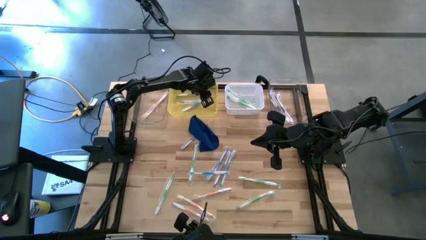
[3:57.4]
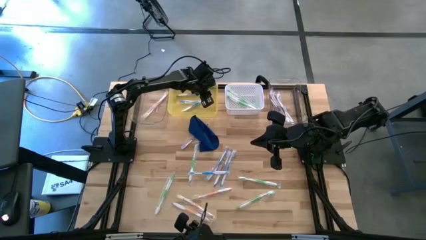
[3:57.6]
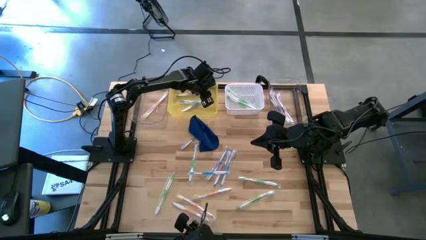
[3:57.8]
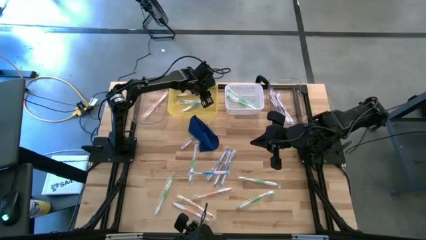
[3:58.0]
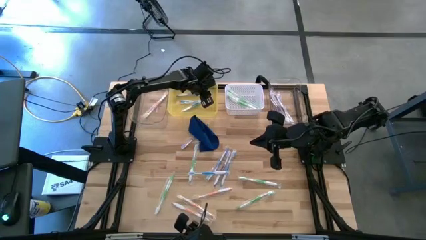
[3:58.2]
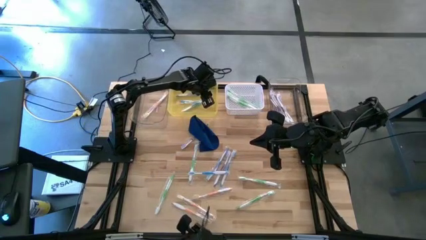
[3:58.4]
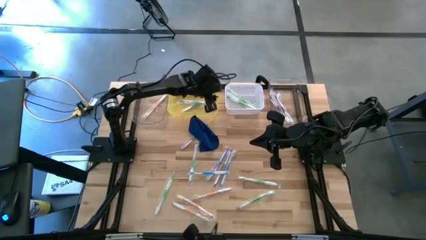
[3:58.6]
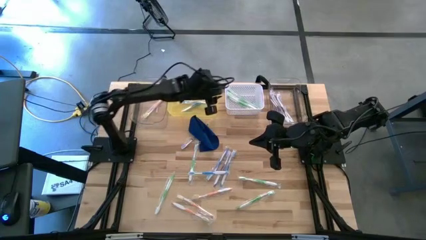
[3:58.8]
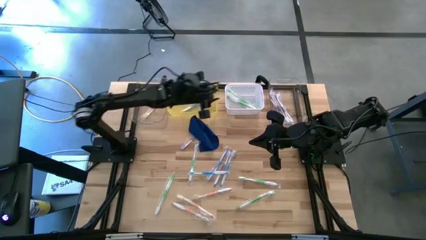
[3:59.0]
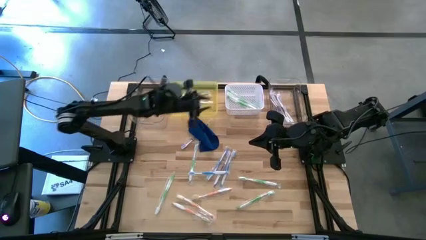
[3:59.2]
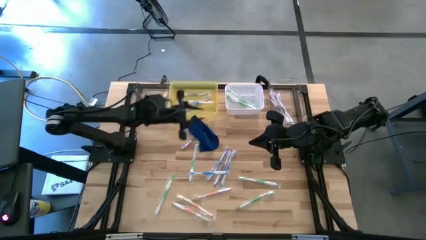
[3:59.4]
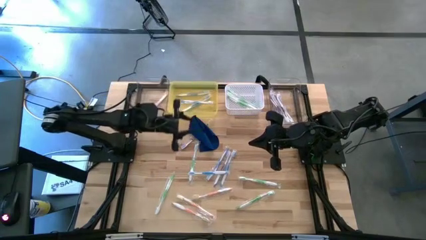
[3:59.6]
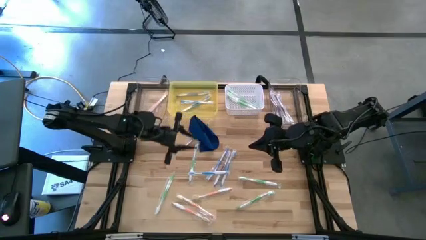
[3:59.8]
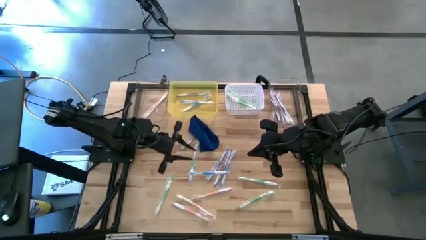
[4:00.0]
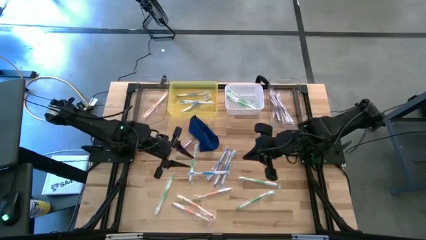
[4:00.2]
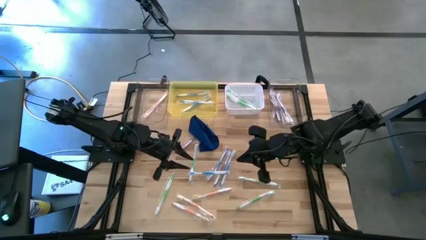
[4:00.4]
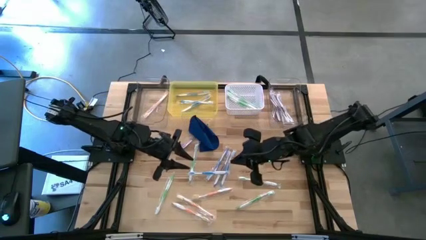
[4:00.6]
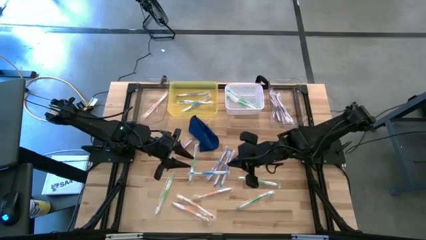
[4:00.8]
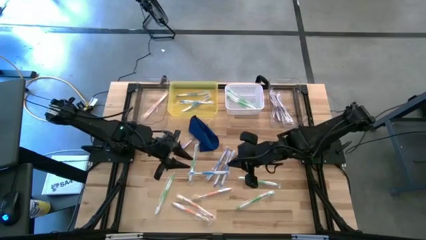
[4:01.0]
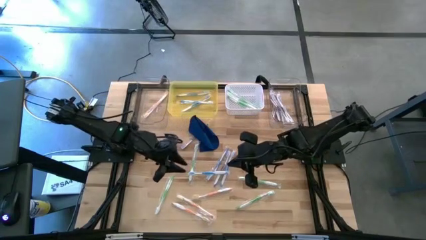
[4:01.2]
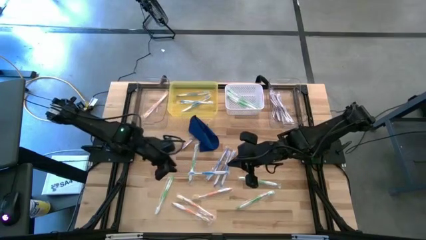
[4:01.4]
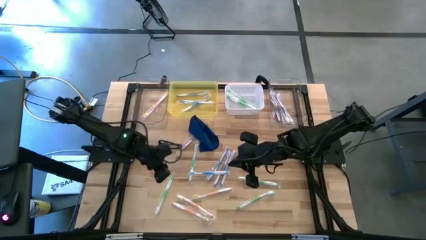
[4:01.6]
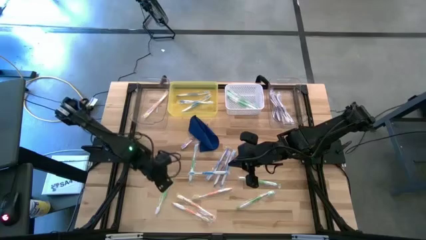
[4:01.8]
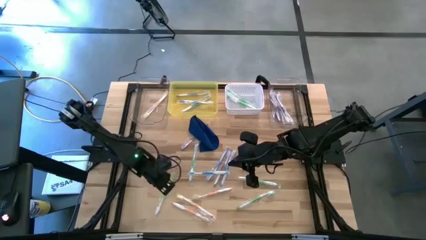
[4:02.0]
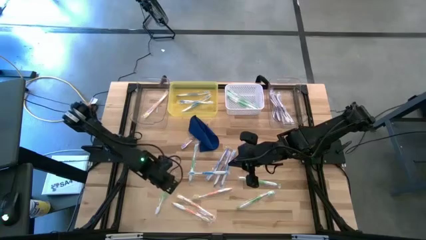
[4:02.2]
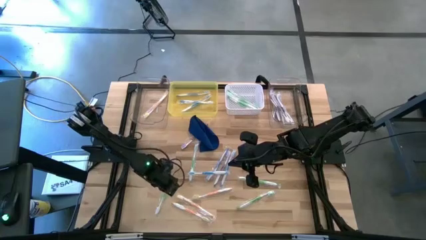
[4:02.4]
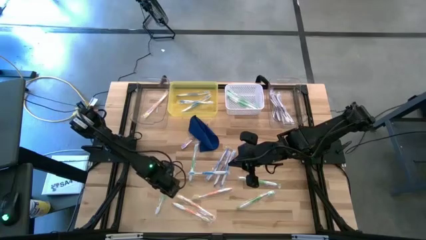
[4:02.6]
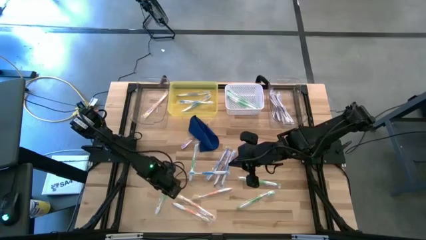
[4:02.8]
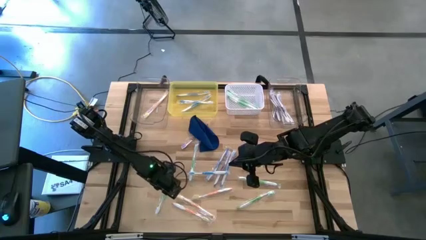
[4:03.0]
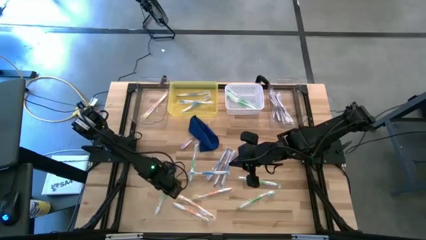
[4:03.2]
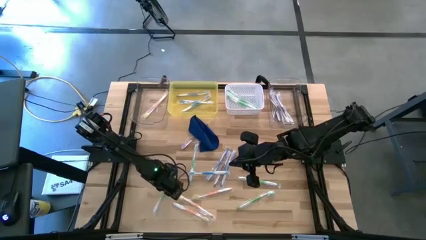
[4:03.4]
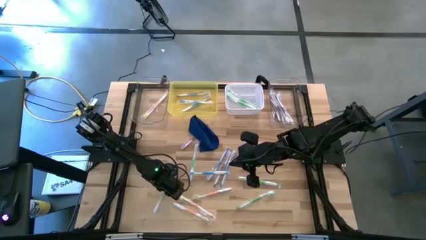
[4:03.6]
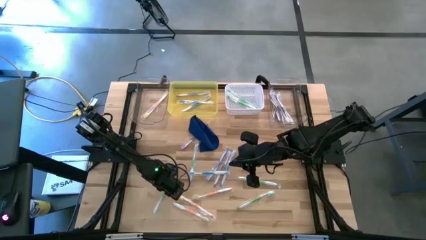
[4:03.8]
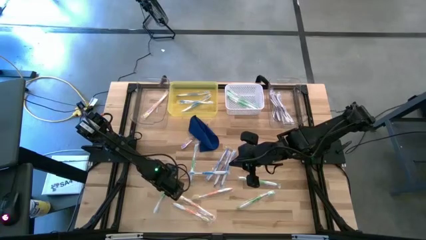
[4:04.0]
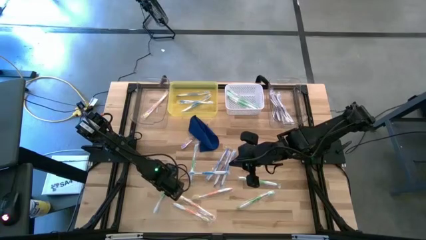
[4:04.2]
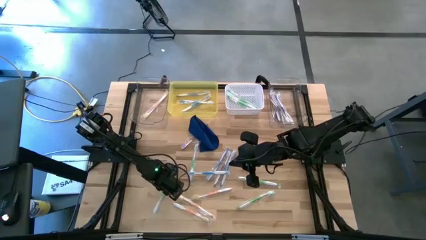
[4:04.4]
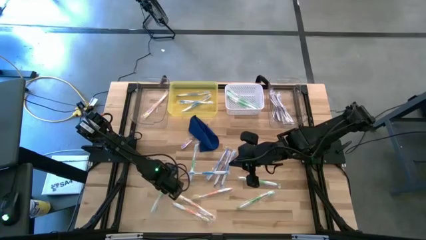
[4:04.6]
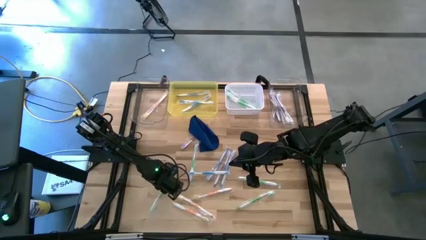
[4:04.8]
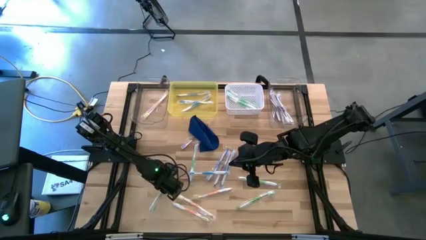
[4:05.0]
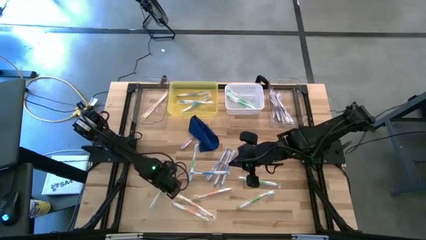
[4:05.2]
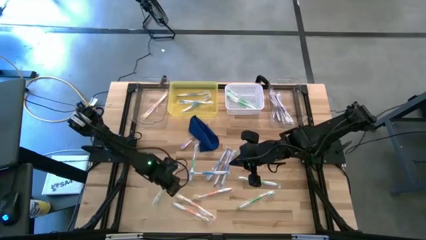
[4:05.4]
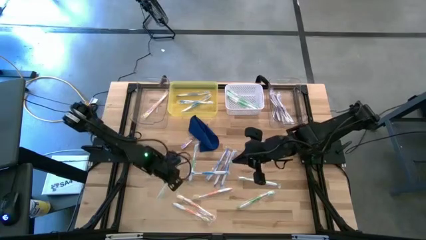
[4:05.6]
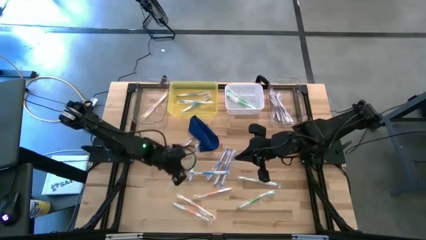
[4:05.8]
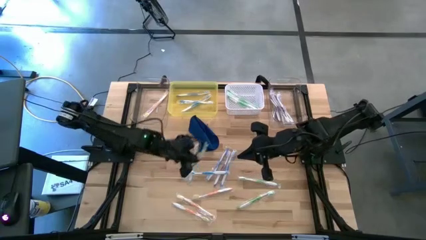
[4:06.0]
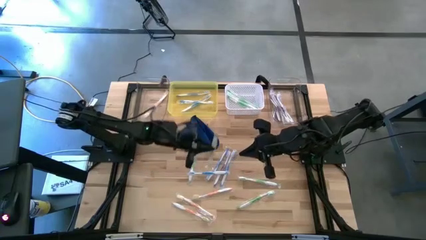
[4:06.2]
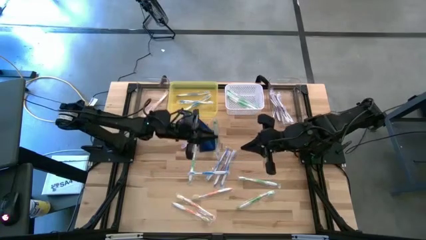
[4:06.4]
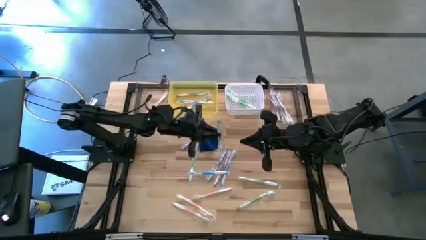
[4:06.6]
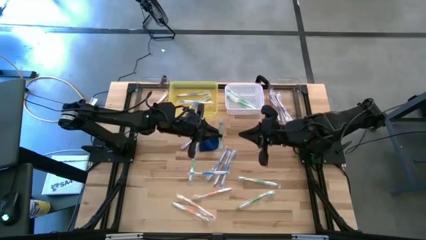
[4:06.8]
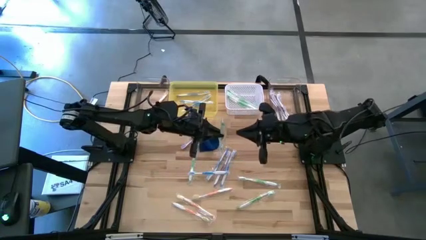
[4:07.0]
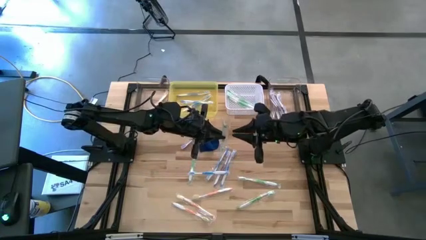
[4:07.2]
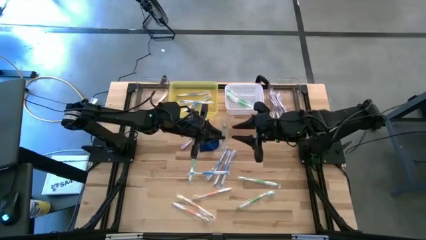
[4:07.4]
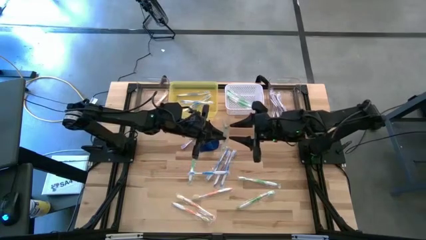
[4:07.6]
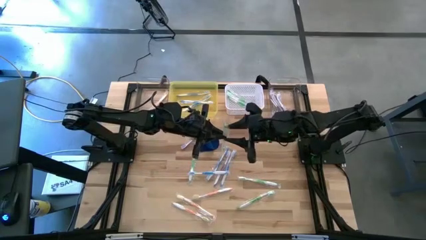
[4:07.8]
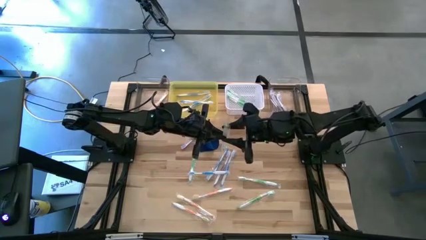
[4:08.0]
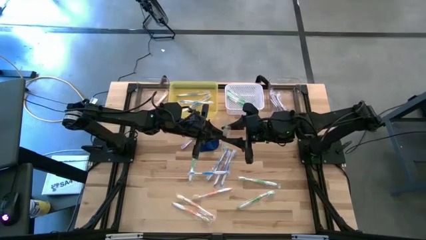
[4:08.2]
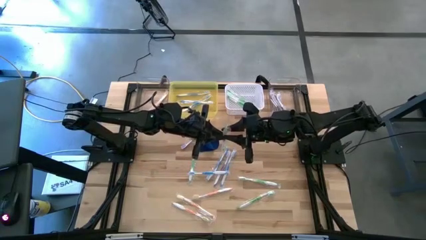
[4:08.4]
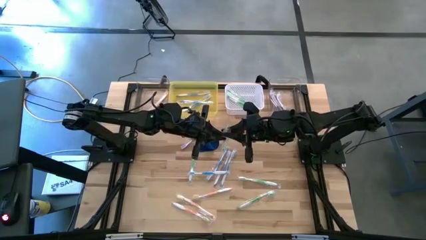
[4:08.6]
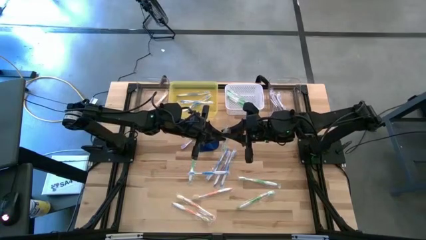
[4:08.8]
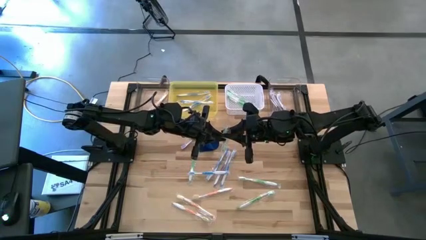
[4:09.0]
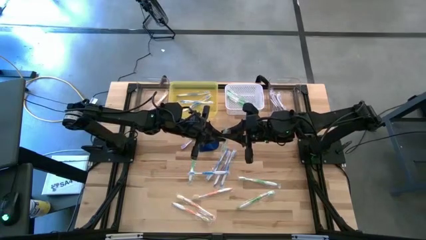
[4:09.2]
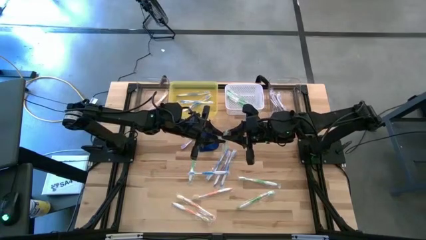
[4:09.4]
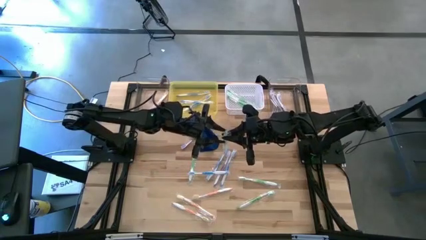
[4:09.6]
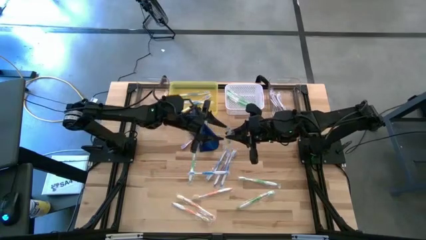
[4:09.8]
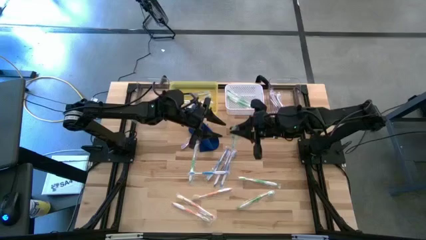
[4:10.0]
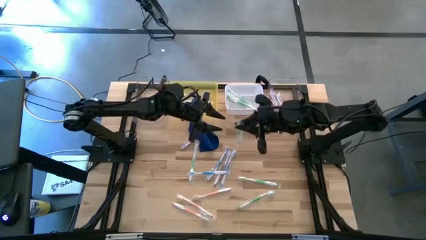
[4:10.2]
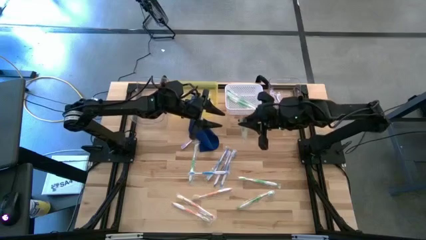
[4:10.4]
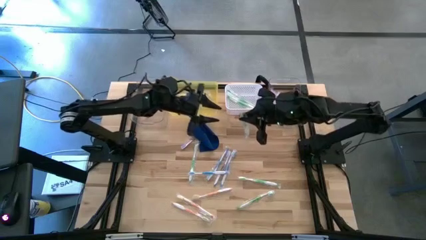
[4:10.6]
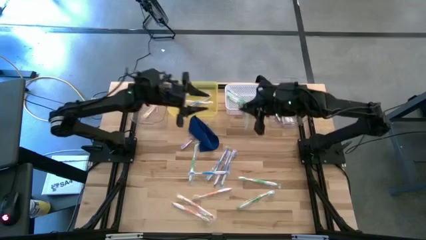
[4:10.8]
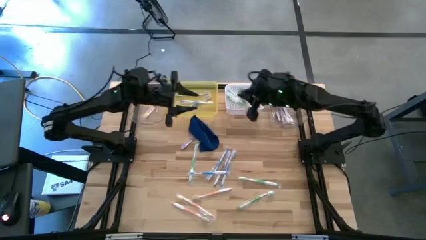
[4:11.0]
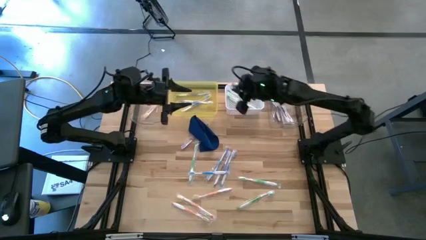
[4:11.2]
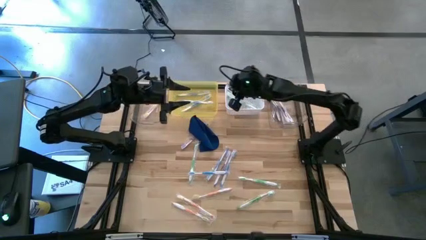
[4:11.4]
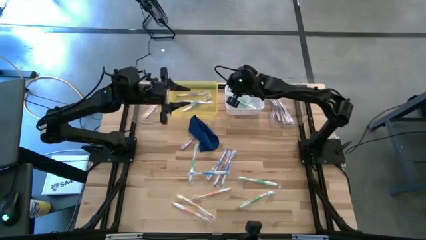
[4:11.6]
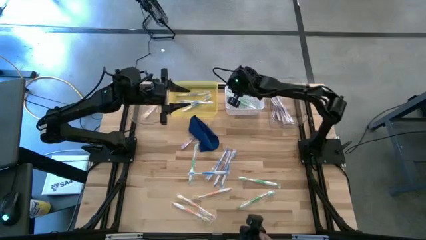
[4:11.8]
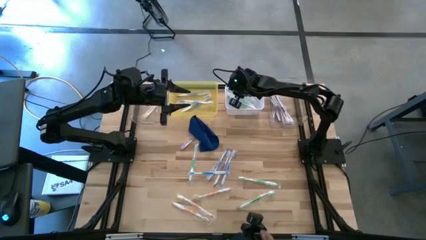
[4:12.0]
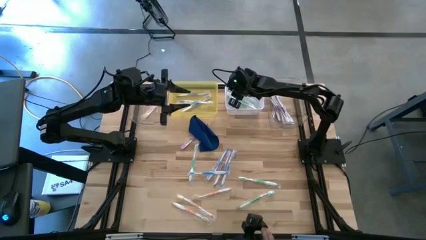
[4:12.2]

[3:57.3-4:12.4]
Task: Pick & Place Toothbrushes
Put the green toothbrush into the white bin

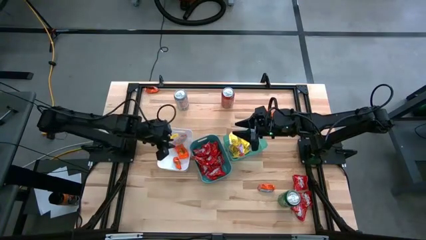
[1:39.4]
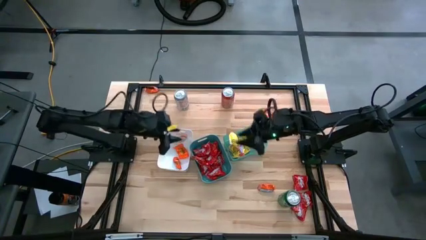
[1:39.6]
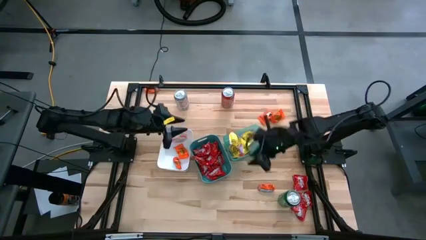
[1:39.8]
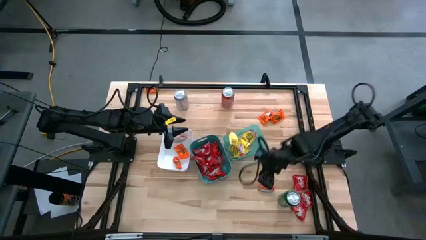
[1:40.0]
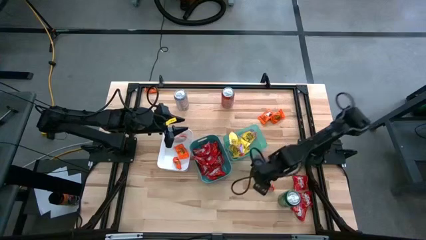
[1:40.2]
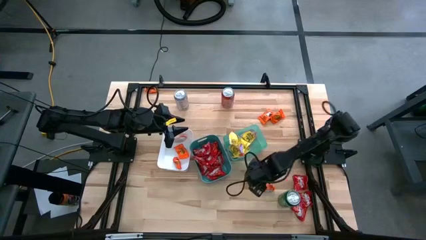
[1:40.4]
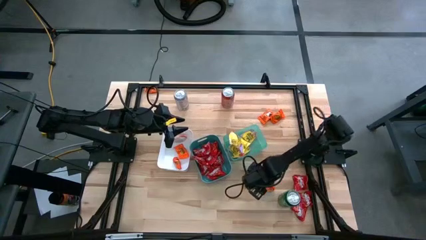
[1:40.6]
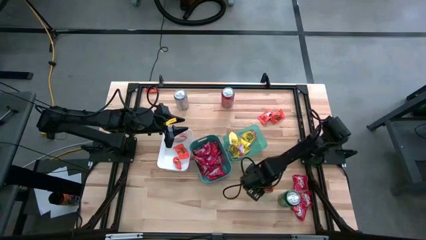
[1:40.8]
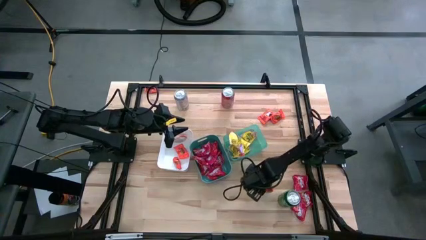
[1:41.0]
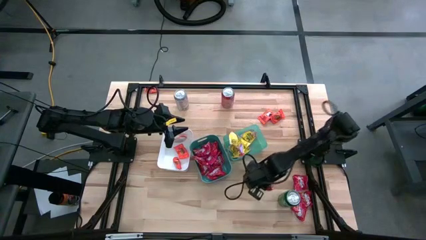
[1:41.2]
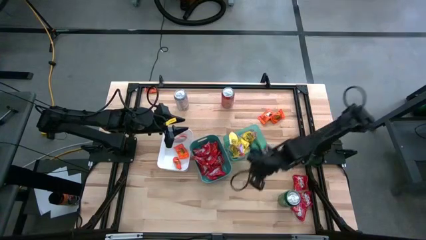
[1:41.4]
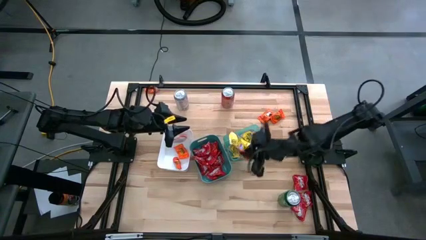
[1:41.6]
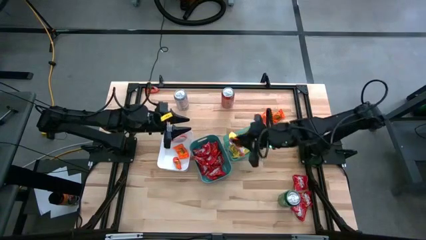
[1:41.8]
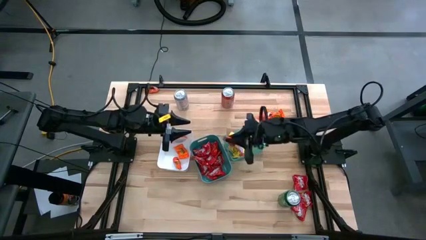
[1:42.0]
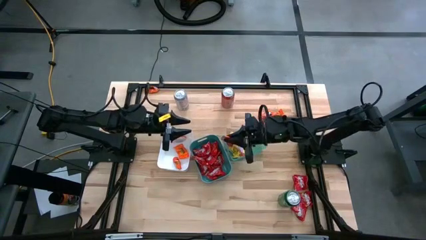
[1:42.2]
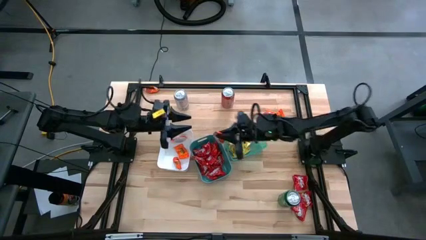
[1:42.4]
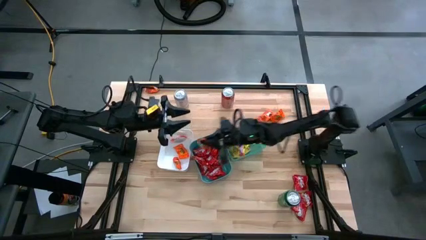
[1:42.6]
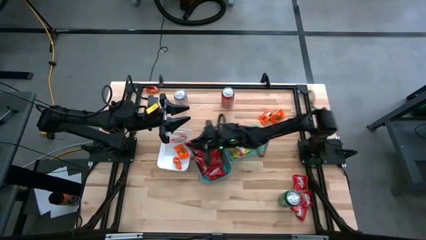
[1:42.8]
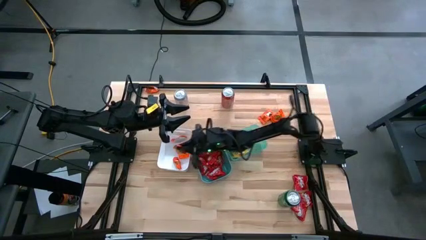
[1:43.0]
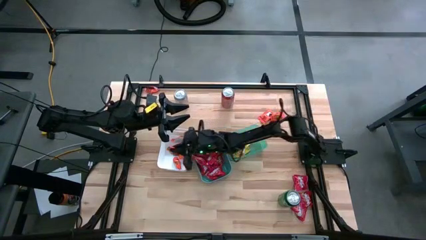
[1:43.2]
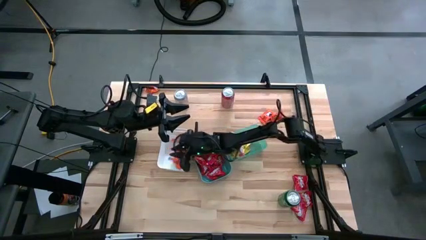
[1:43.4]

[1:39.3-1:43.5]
Task: Sort candy
Put the orange chocolate into the white bin
